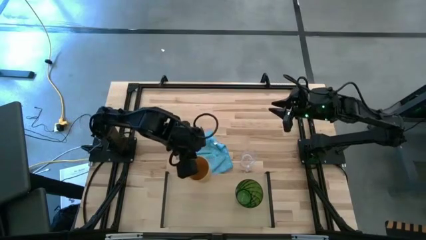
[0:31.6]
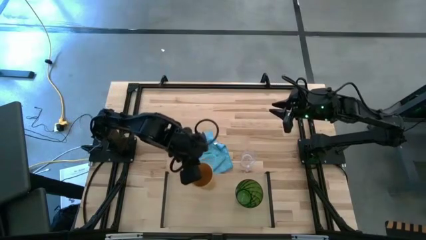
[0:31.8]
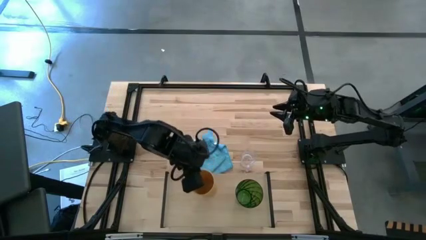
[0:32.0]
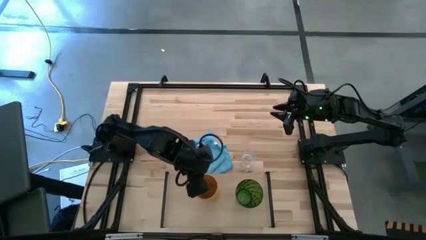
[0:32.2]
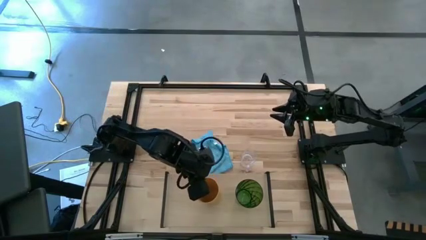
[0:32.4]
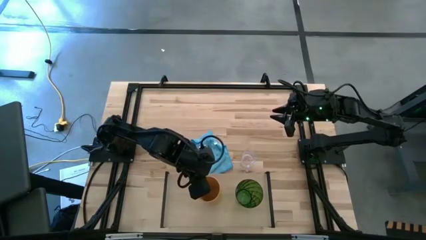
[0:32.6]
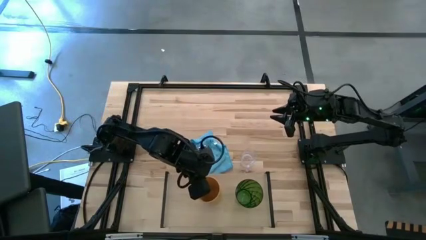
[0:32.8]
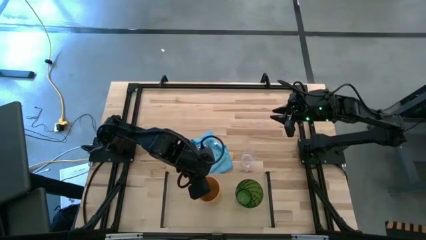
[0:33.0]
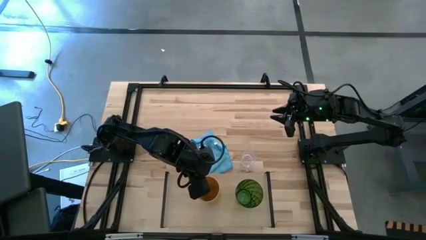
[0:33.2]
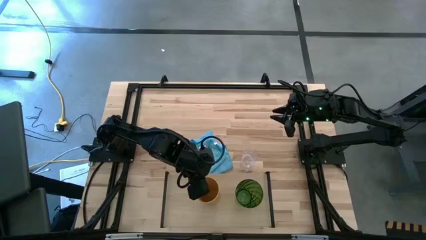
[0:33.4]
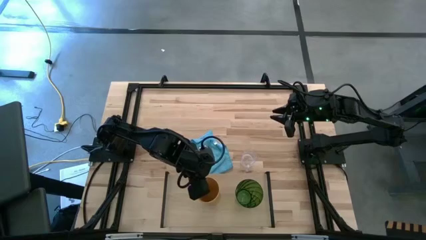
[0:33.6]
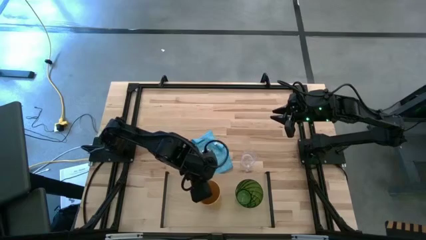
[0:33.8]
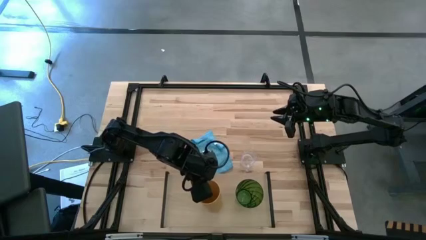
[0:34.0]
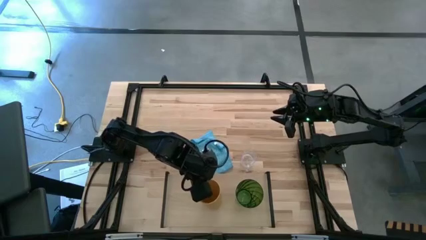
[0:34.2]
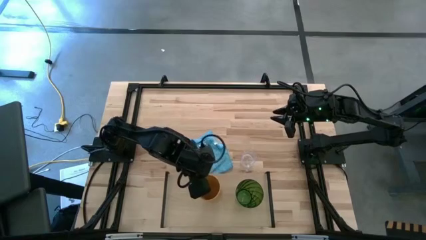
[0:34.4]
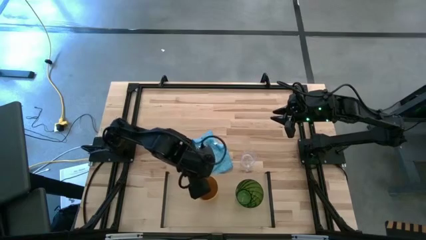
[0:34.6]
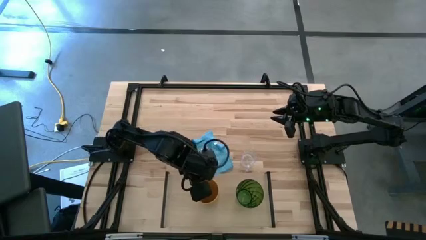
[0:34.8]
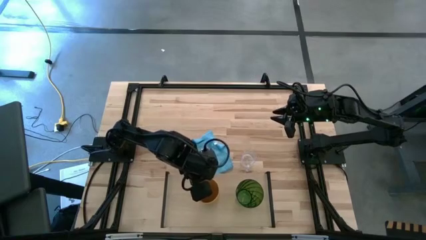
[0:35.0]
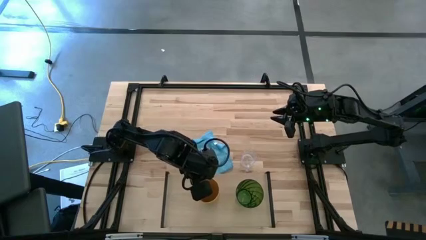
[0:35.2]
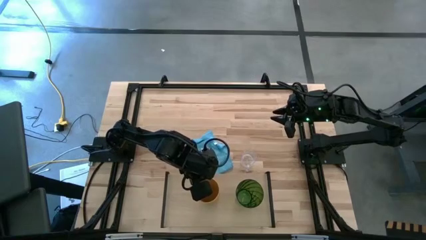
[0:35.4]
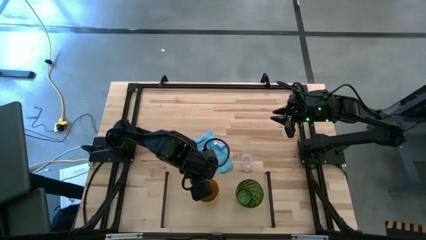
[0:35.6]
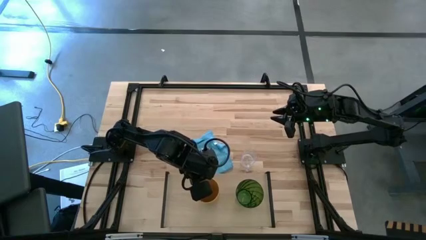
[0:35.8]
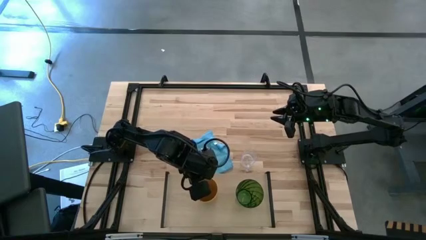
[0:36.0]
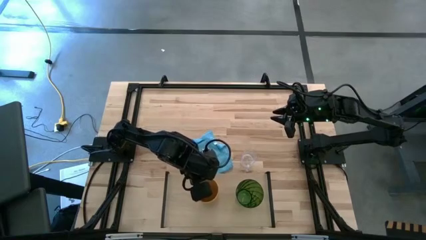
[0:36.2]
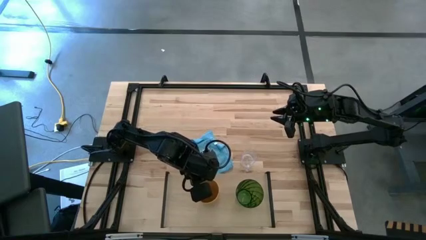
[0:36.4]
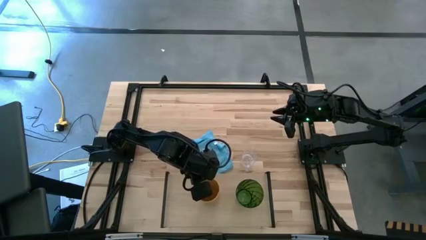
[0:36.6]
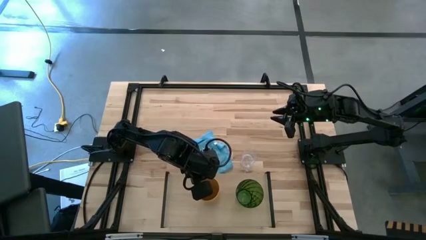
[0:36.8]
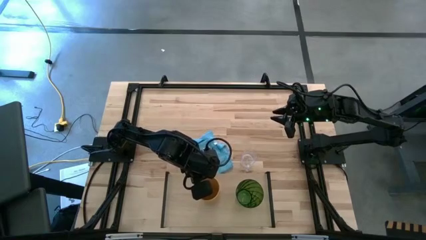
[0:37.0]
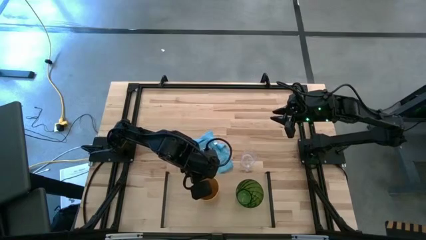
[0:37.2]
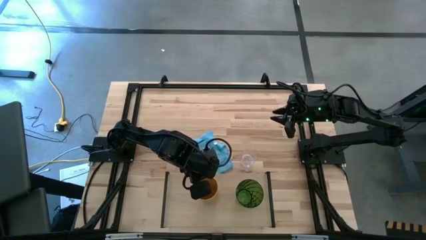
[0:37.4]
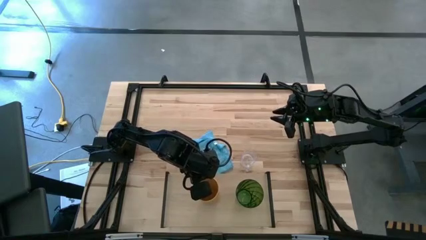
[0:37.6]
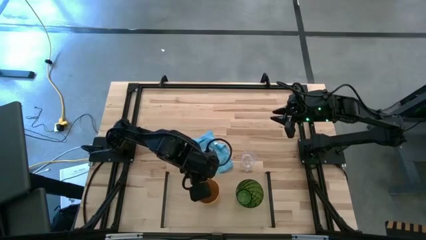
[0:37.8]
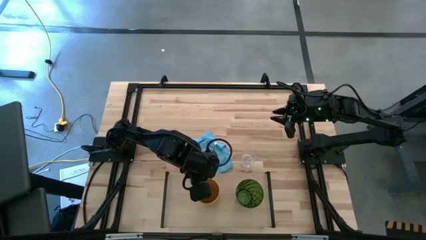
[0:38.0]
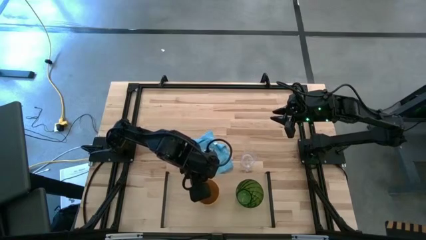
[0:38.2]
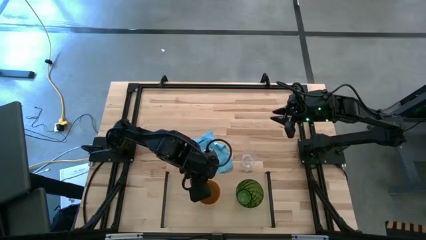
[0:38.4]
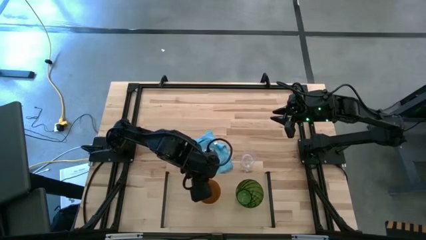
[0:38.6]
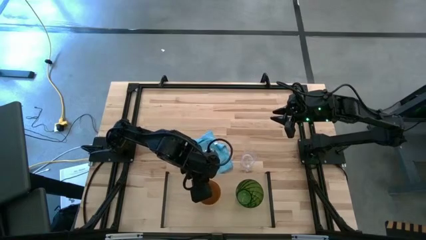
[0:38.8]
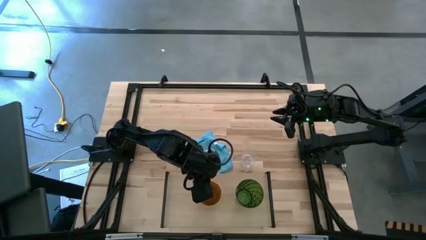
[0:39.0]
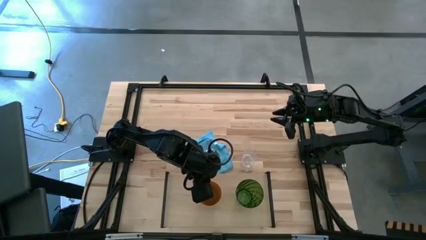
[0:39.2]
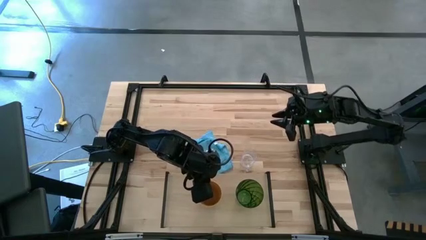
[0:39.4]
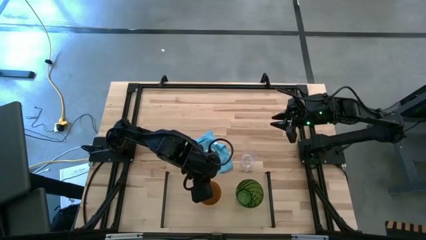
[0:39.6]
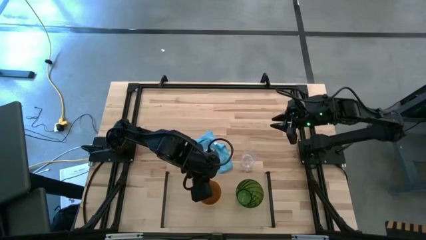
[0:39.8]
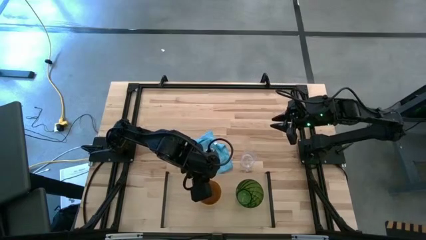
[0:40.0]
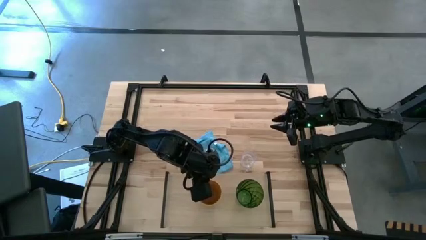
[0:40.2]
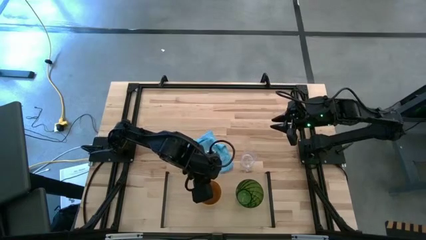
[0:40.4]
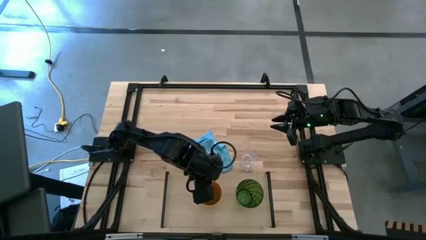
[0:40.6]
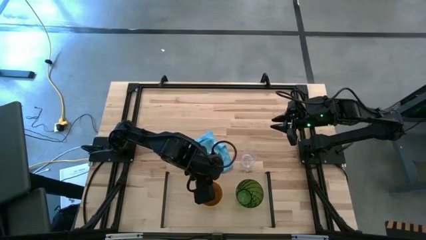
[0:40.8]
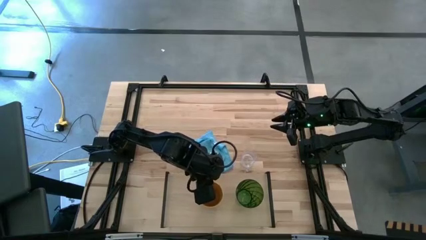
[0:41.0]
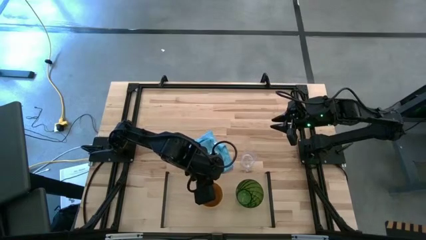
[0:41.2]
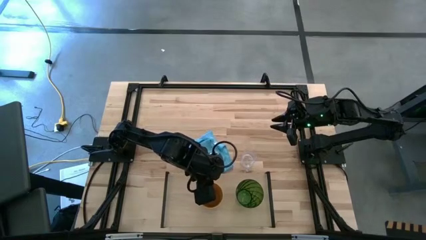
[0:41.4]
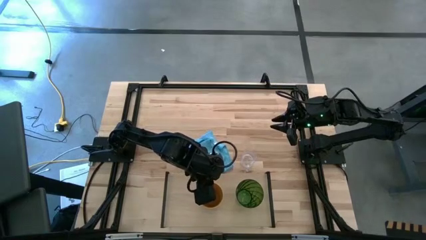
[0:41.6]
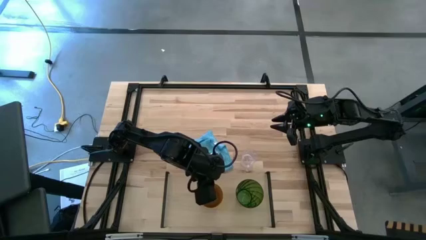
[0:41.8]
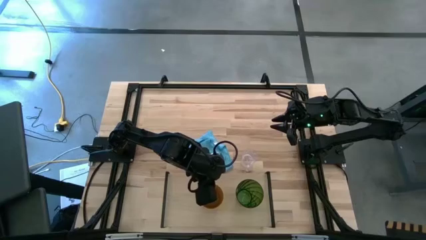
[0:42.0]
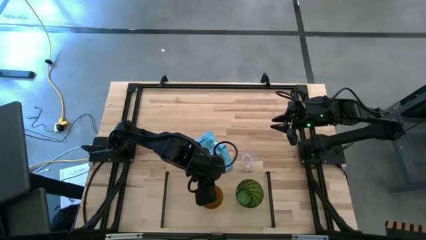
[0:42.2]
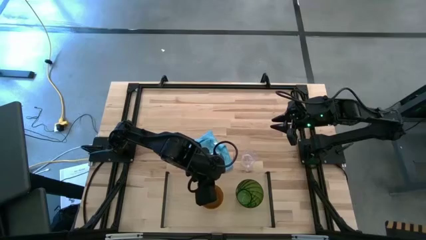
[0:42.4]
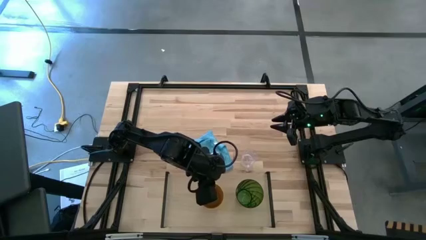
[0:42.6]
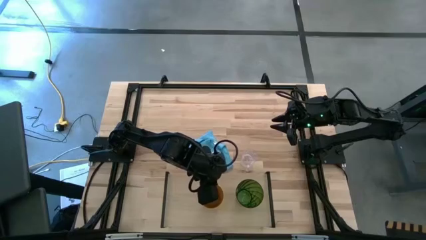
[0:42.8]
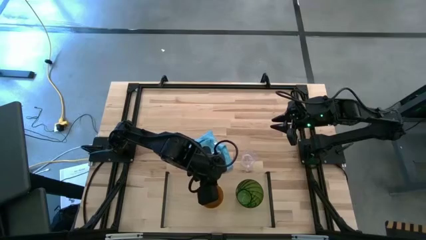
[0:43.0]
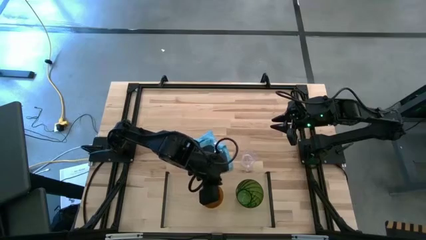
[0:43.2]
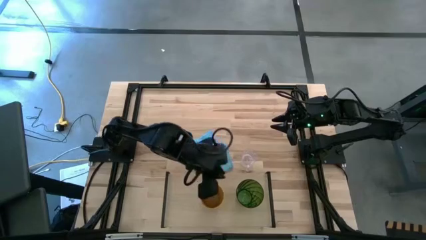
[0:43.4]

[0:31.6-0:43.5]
Task: Stack small to large cups/mugs on shelf
Put the yellow cup on the shelf

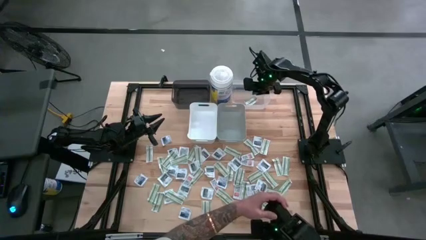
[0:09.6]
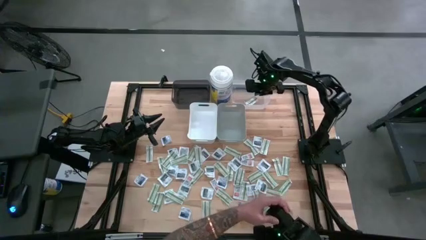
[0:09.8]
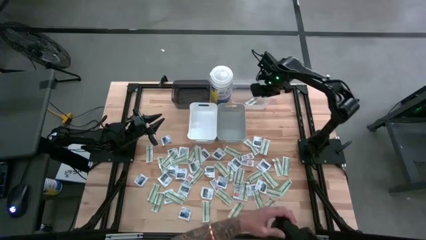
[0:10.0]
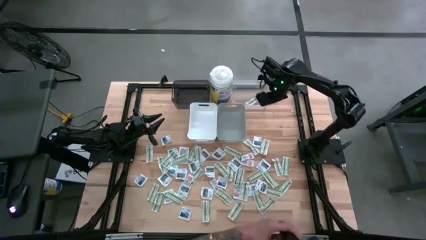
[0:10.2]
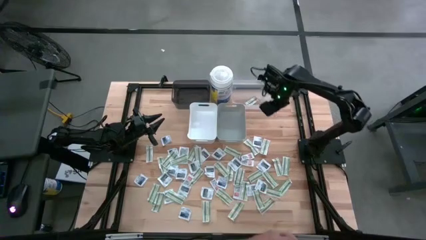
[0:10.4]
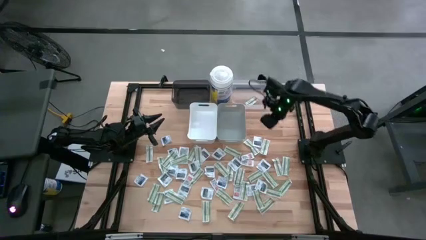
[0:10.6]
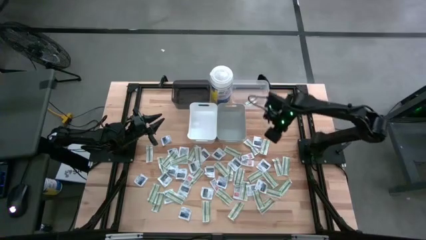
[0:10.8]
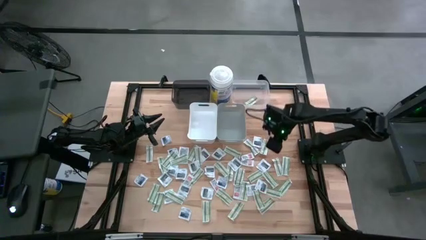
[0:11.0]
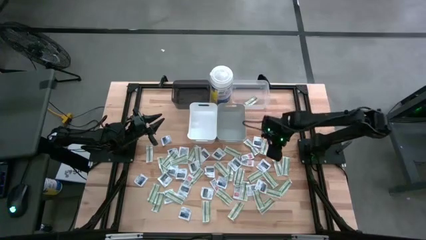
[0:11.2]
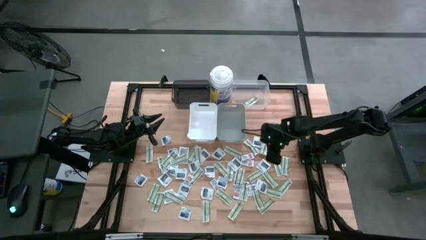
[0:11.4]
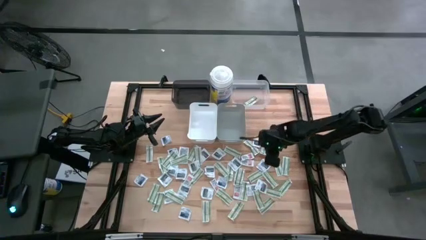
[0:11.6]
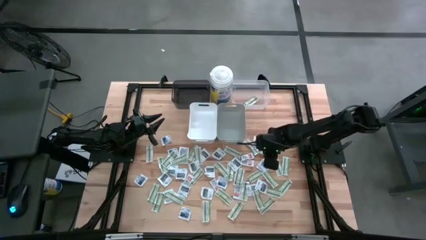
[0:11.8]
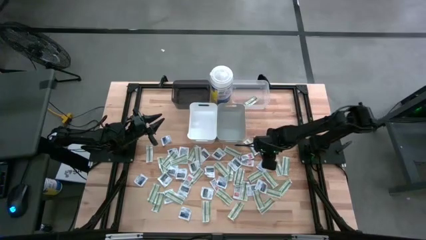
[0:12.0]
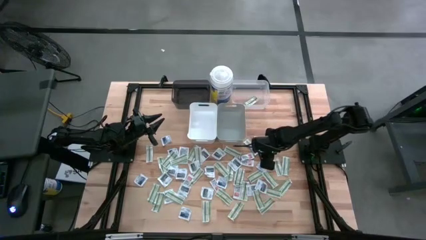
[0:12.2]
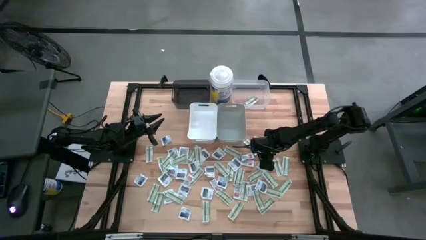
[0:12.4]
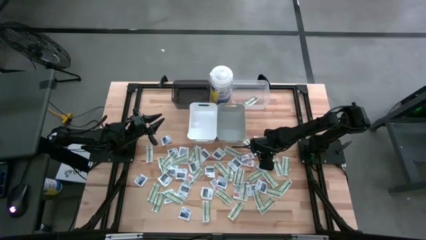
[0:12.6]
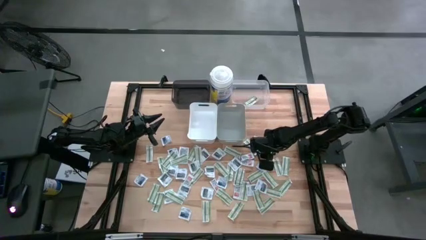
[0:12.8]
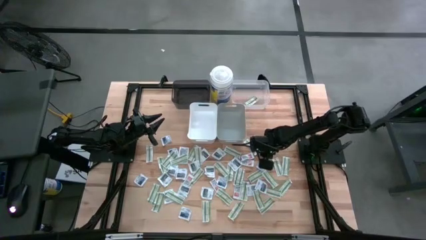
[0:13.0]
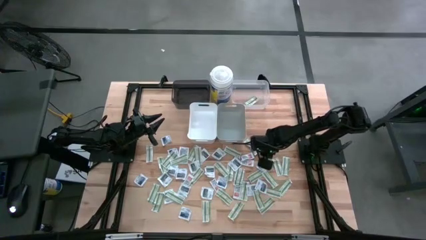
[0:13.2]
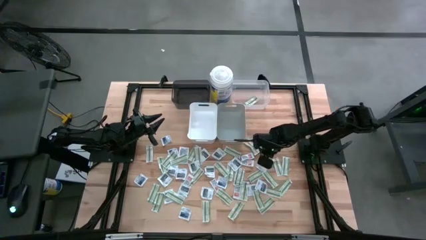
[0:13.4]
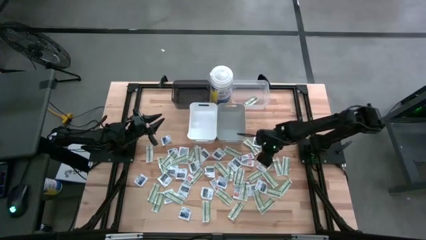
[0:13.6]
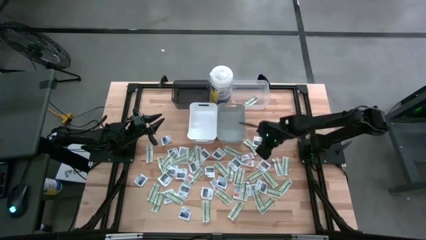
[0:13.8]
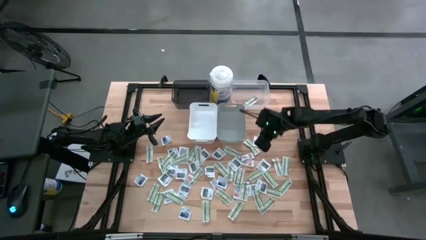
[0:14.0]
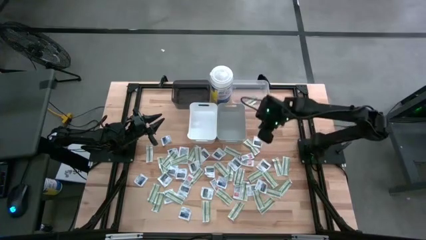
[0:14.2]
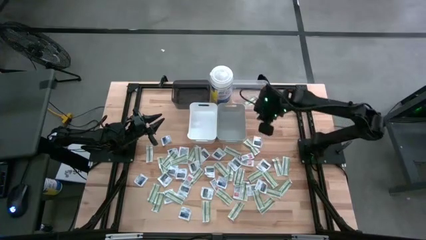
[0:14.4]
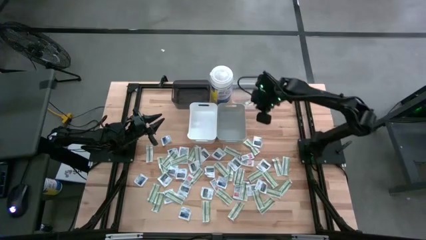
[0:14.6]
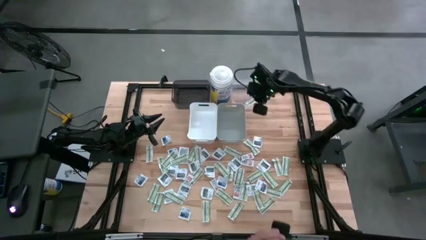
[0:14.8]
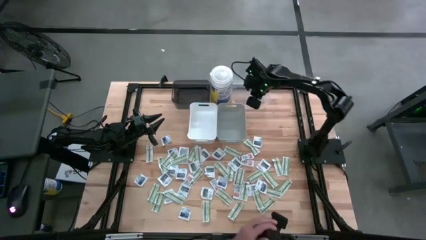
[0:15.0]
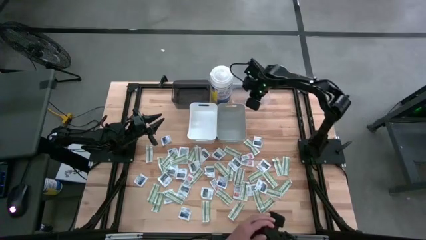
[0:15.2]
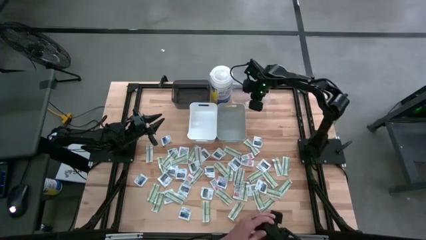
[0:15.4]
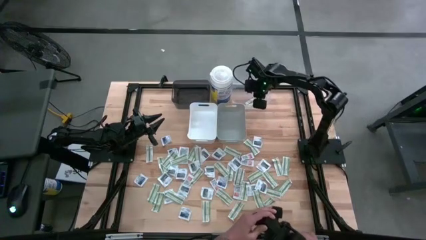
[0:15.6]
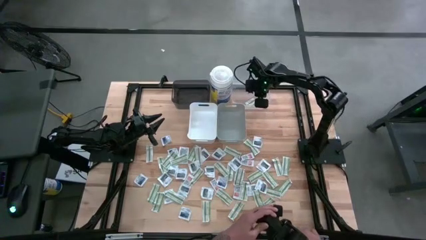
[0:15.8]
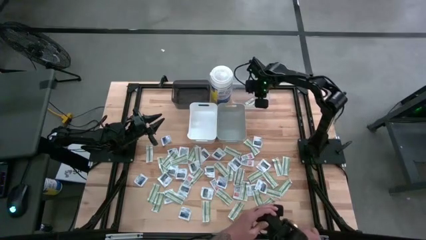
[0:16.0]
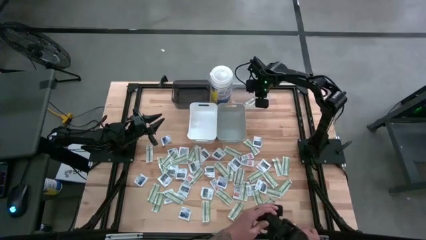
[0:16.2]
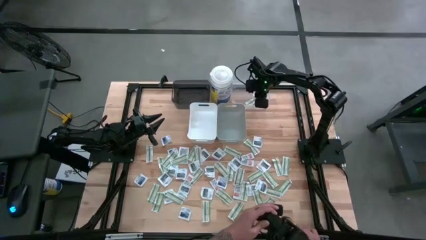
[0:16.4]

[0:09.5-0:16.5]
Task: Pick & Place First Aid Supplies
Put the band aid into the transparent bin
